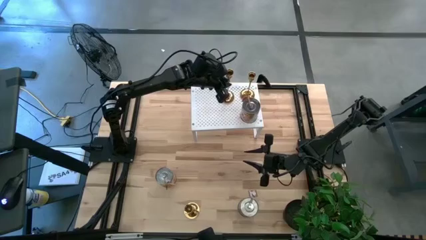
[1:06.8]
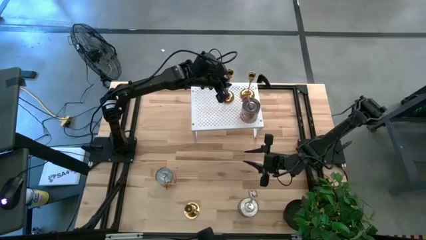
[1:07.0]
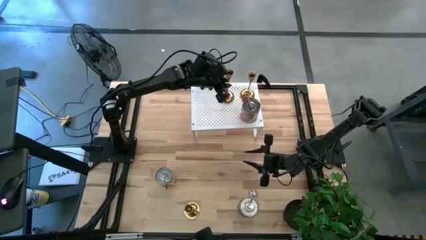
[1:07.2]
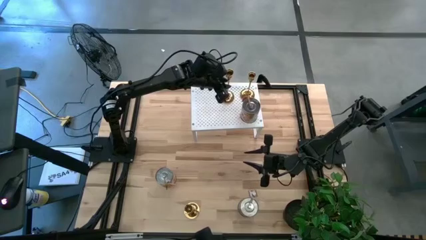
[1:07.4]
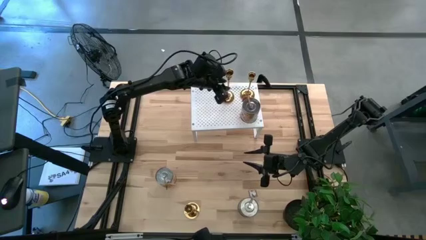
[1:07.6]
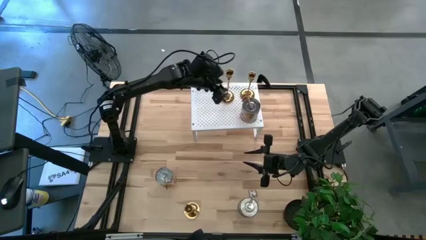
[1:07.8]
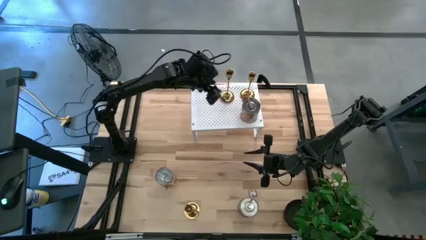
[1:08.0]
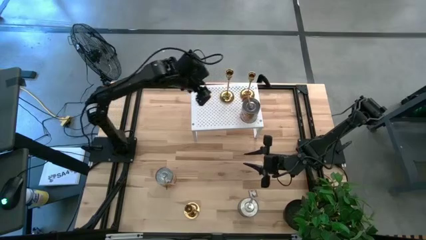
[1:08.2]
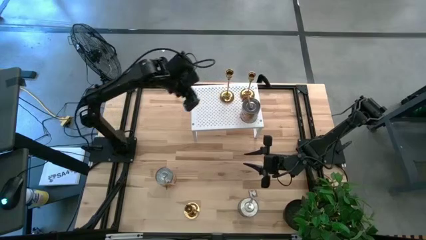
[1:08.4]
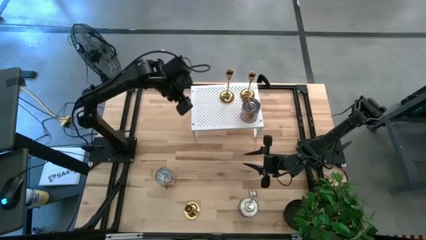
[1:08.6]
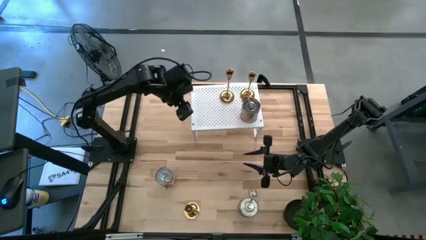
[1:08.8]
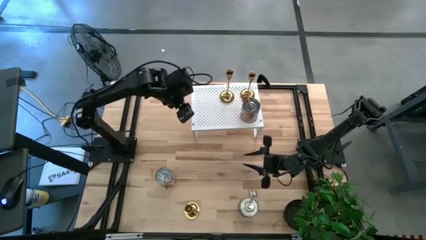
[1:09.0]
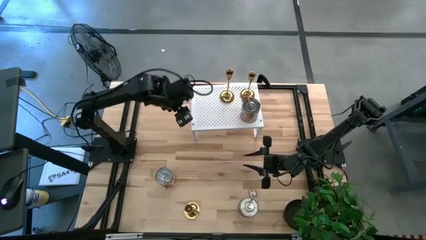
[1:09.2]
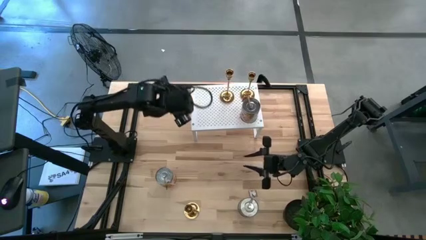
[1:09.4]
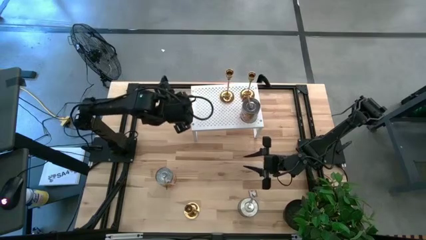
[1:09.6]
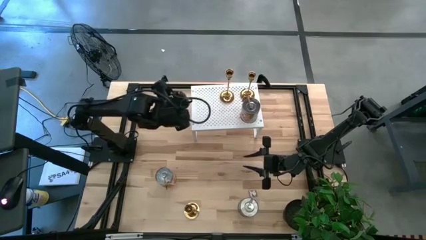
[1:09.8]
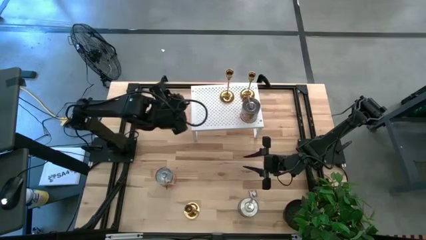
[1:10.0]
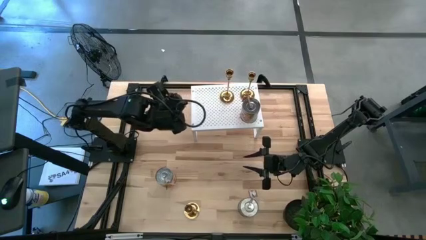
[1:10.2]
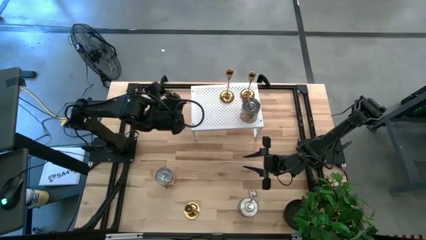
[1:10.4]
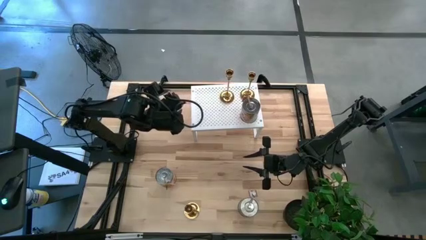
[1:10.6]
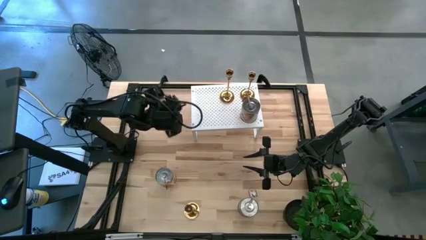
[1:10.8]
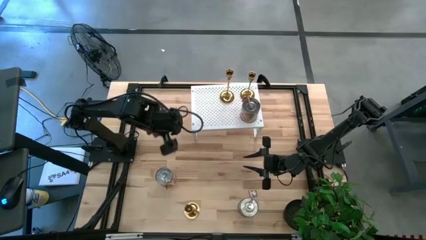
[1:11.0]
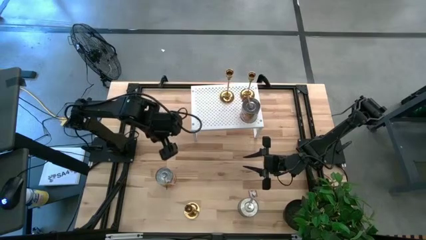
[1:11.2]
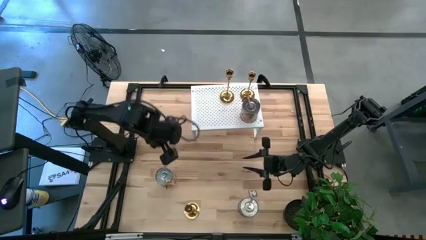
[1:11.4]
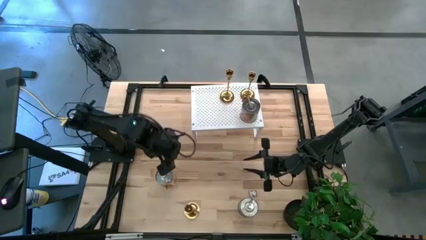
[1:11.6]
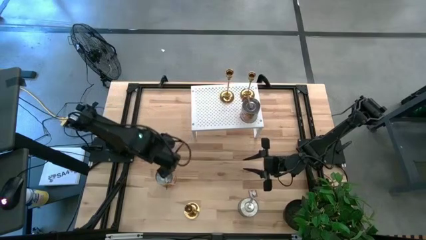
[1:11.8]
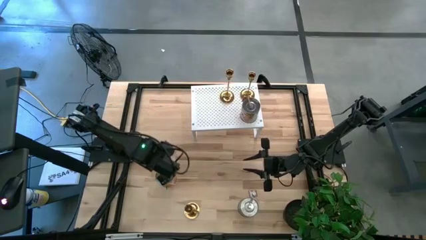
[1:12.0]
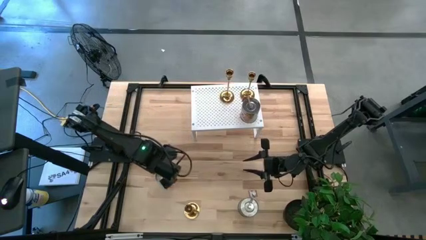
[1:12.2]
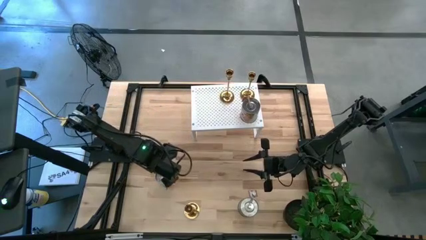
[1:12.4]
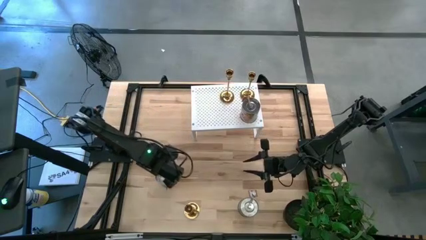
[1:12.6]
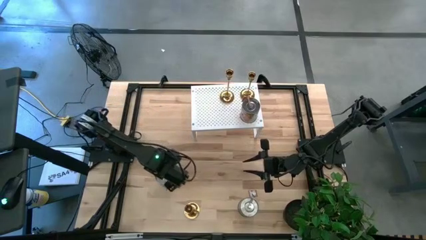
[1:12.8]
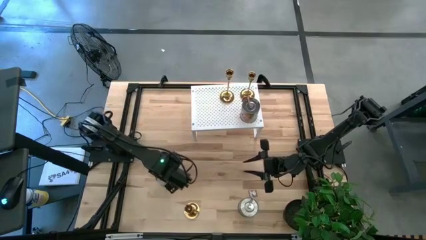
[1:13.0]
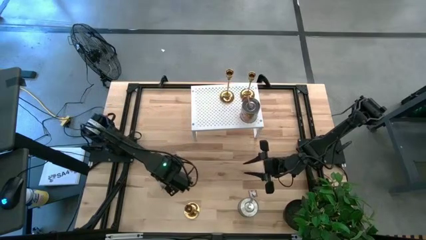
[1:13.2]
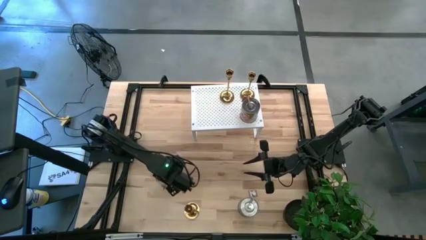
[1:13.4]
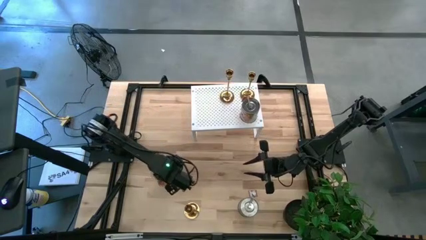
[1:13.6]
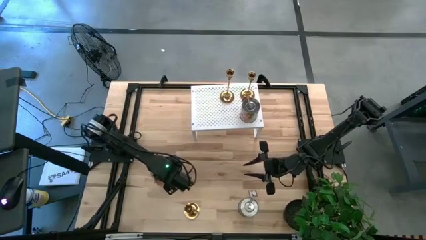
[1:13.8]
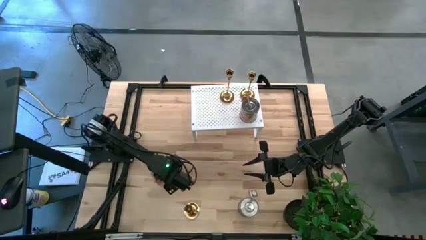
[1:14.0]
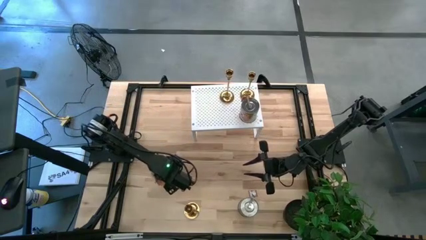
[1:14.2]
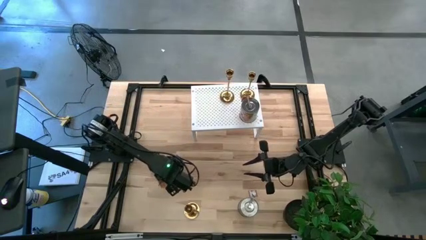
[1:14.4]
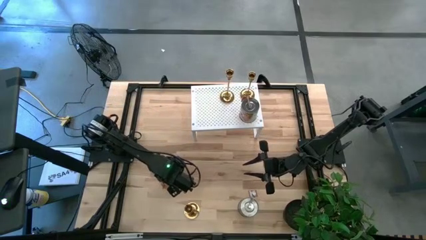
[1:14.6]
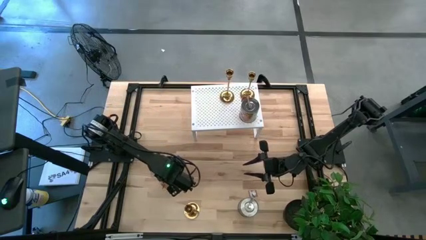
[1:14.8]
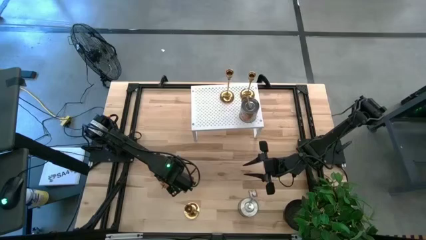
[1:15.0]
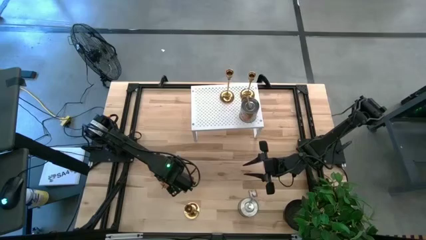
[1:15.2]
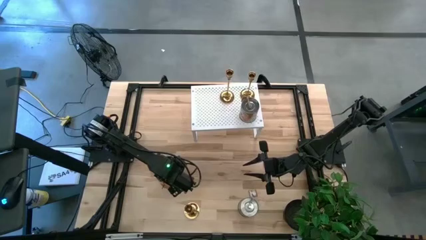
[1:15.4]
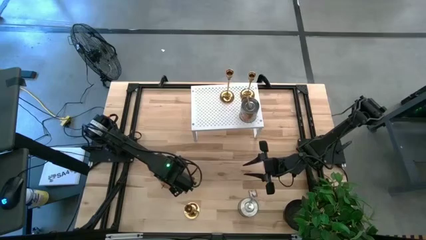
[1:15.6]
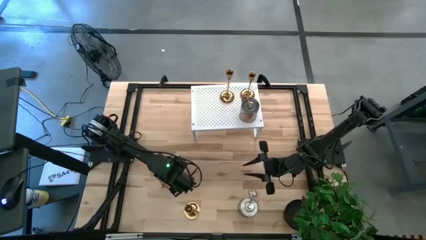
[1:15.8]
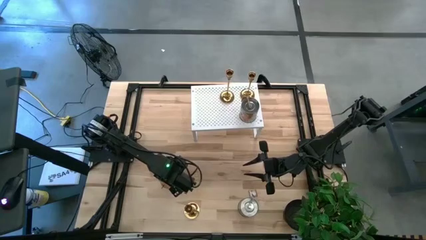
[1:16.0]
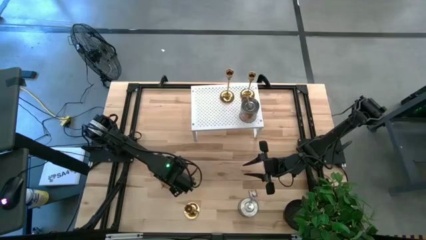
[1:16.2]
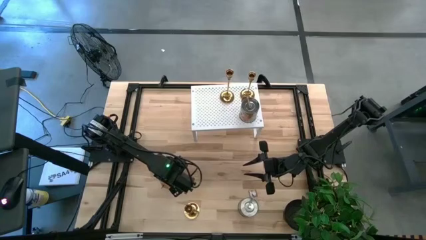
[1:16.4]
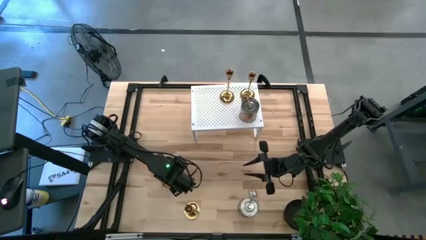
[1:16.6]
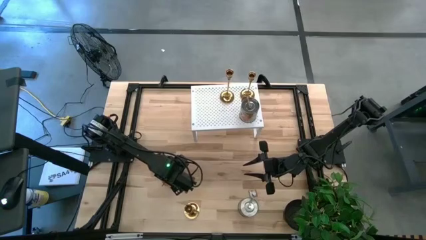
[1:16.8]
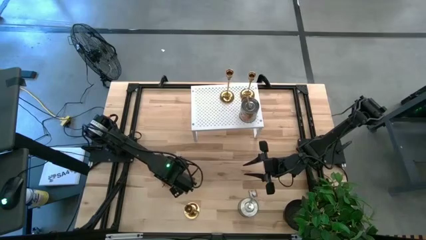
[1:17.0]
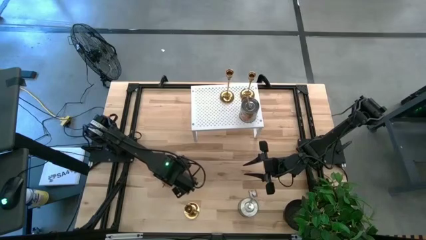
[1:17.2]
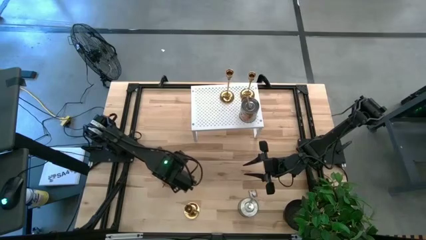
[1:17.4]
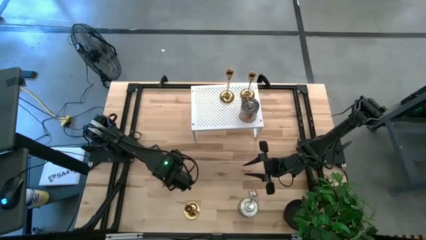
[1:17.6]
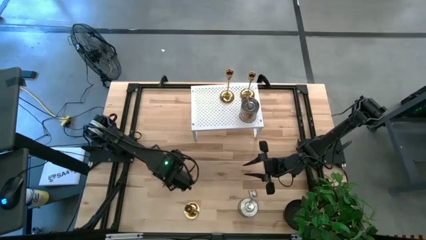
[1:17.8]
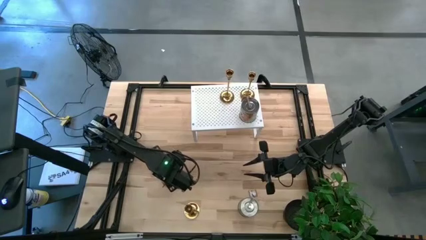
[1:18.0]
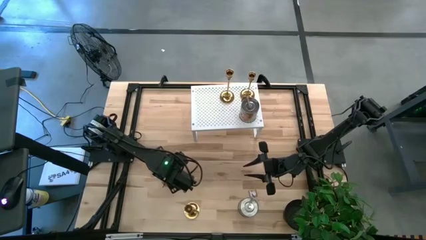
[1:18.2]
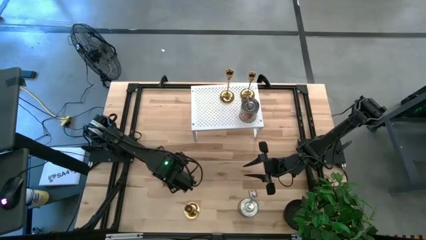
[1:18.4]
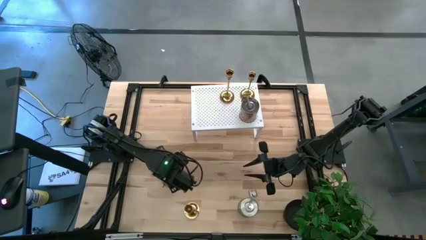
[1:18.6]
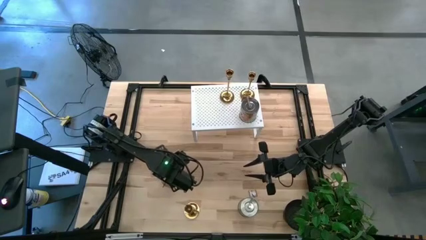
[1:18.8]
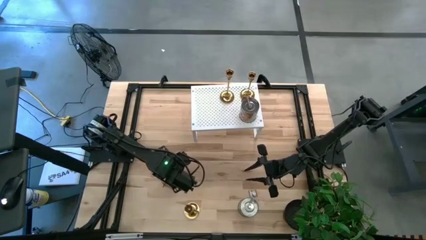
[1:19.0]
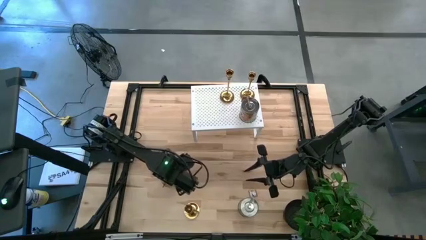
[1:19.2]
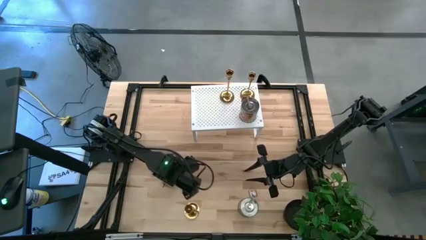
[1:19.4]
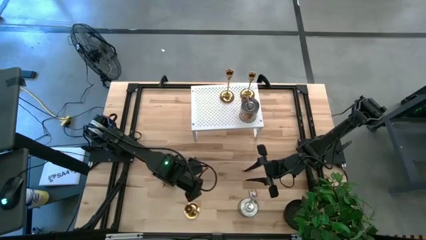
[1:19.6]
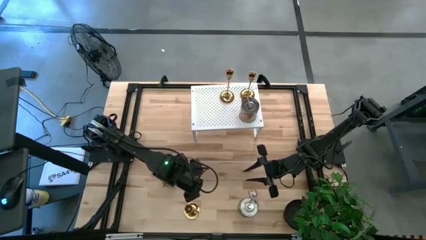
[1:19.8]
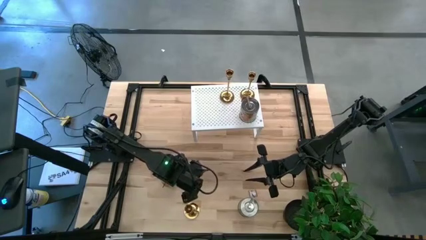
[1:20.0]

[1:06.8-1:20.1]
Task: Pick & Place candle stick holders
Put the left silver candle on the shelf aligned with the other silver candle

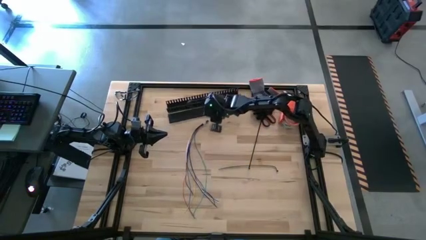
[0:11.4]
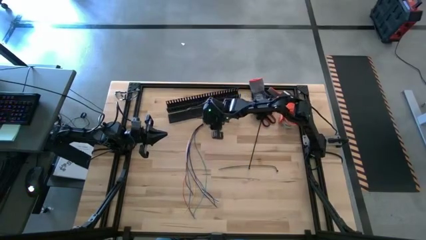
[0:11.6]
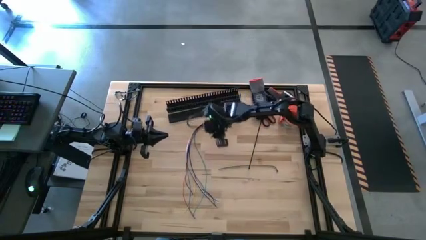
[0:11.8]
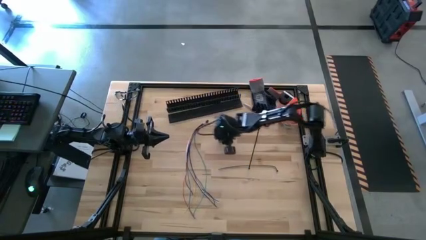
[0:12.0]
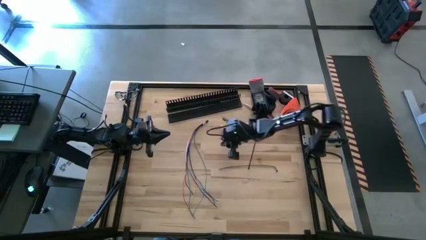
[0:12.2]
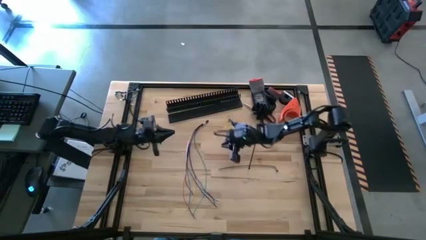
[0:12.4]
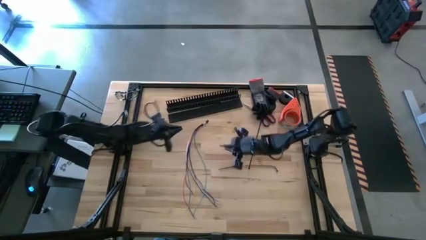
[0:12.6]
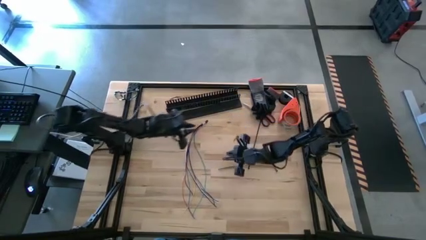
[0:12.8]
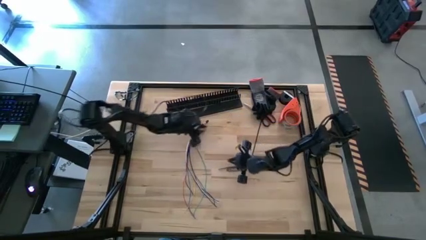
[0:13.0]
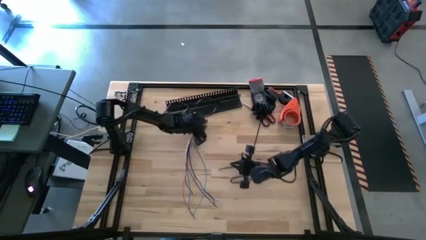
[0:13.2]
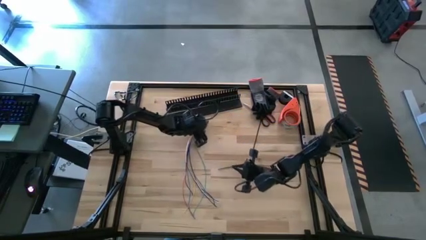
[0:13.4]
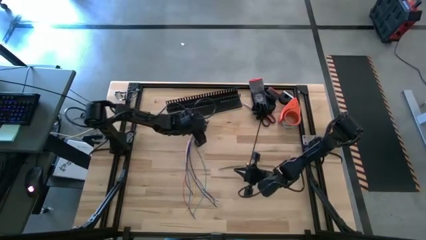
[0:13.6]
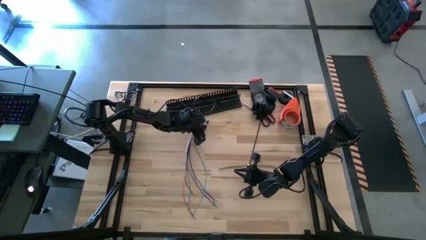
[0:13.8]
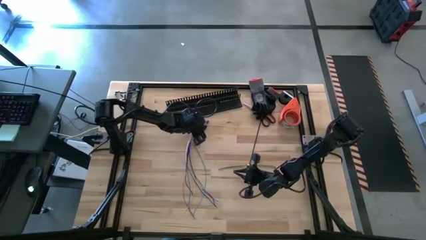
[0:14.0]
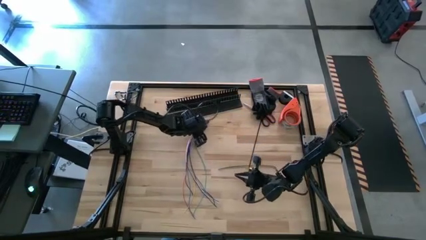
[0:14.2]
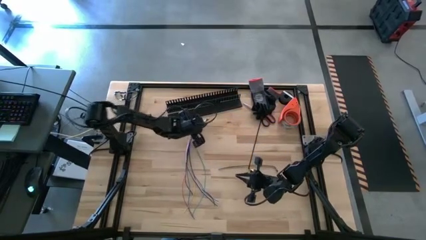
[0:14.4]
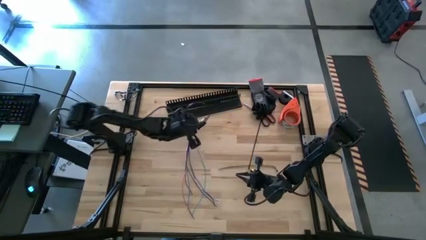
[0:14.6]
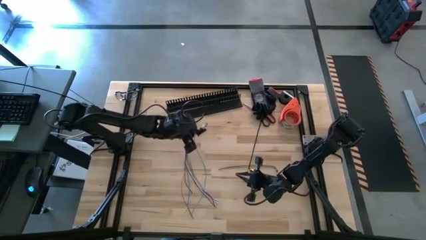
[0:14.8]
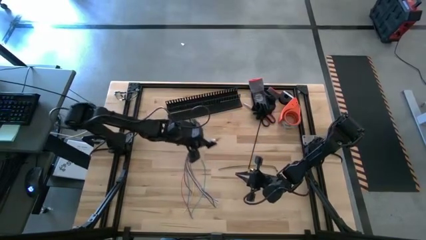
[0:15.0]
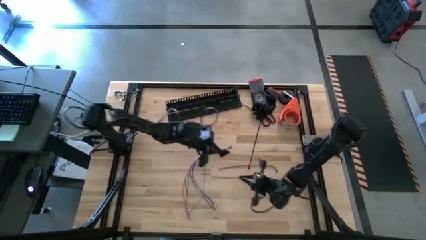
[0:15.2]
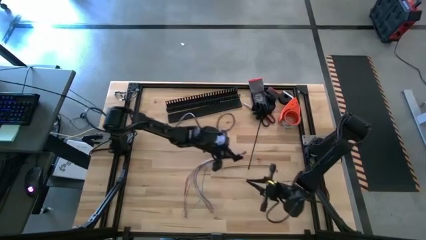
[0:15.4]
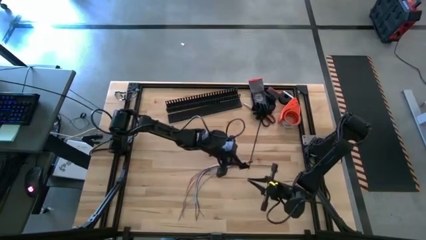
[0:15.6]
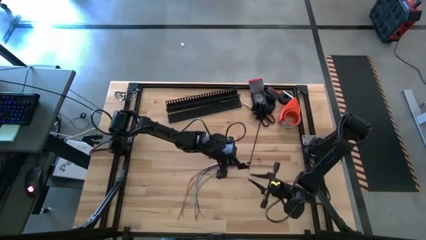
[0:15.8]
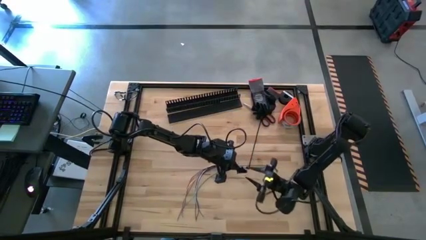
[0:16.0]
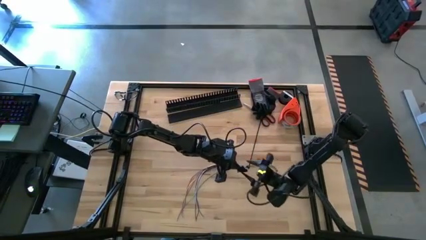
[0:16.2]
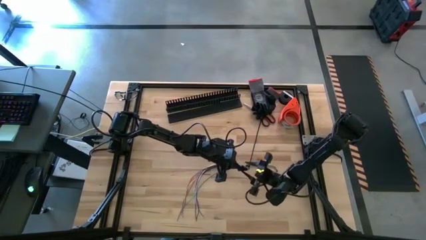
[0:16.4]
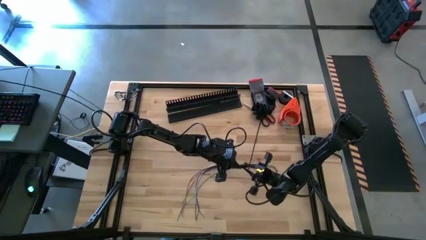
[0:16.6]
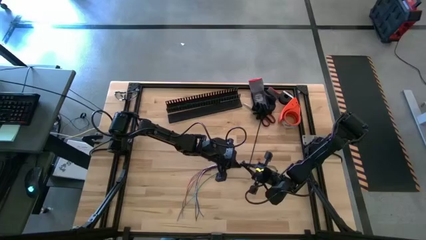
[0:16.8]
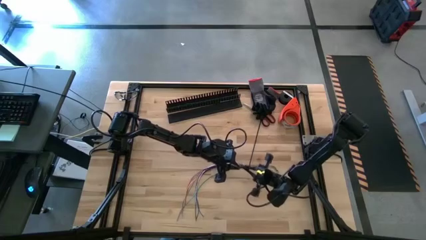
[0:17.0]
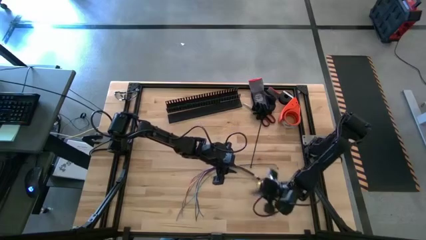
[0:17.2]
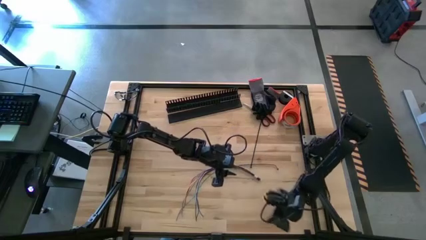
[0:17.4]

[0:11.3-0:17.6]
Task: Ziptie cables
Wrap the top black zip tie around the colored cable bundle
